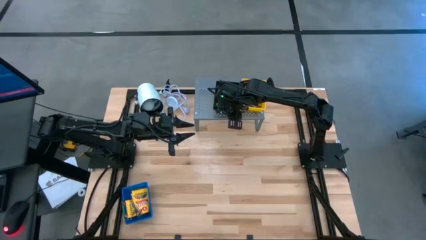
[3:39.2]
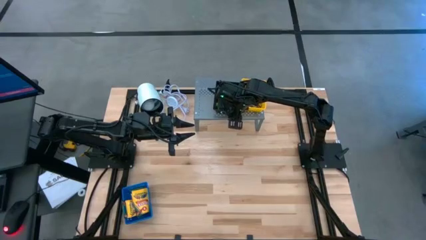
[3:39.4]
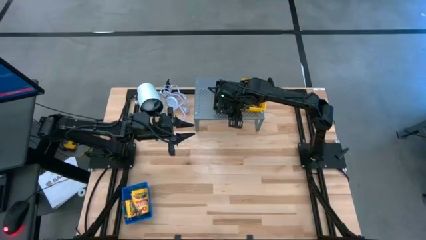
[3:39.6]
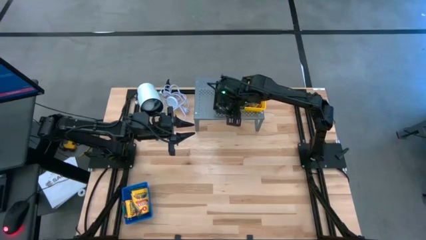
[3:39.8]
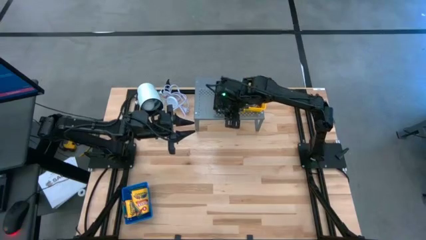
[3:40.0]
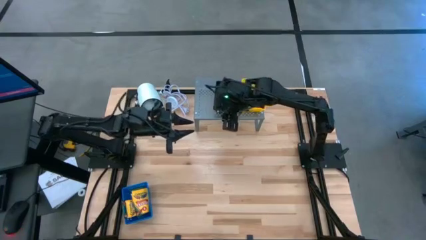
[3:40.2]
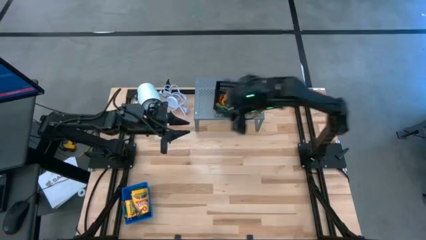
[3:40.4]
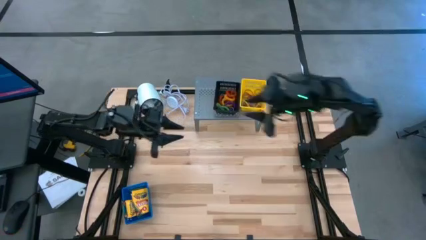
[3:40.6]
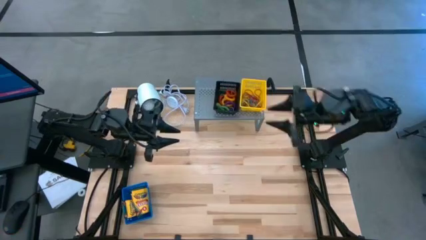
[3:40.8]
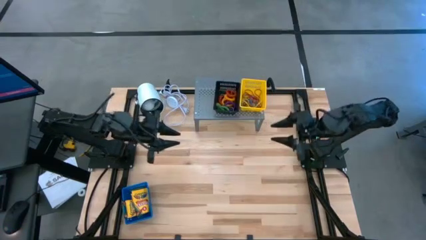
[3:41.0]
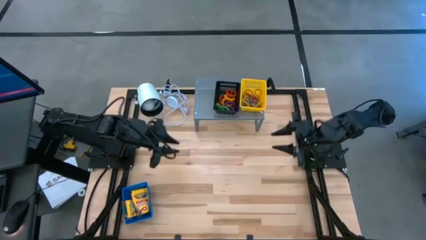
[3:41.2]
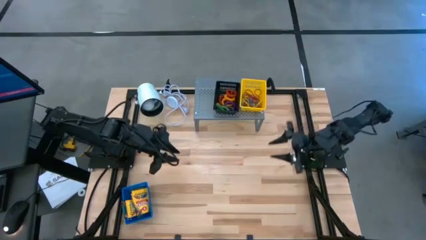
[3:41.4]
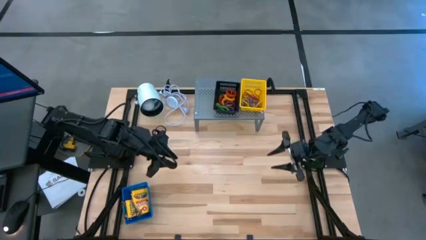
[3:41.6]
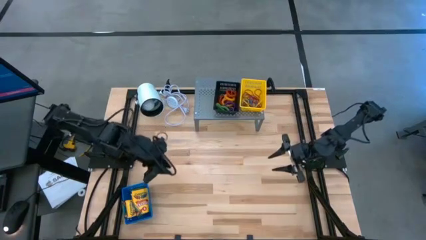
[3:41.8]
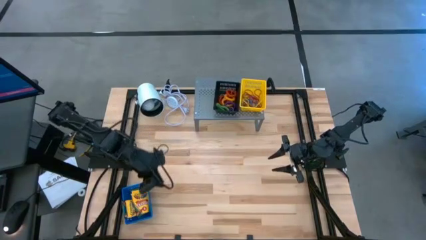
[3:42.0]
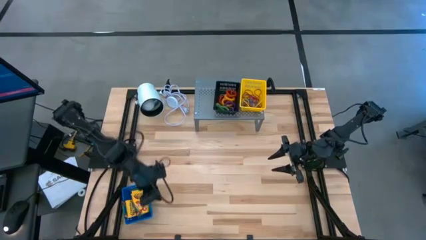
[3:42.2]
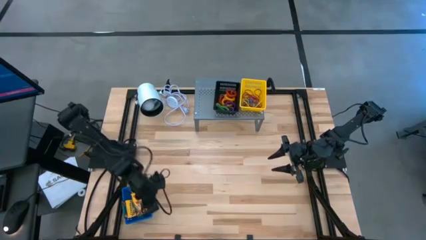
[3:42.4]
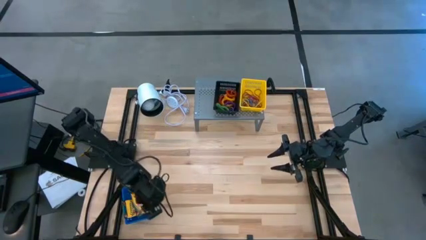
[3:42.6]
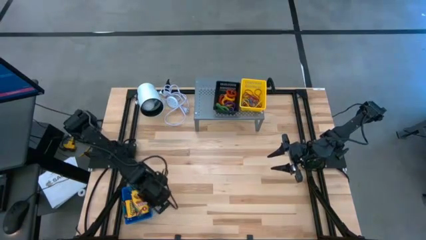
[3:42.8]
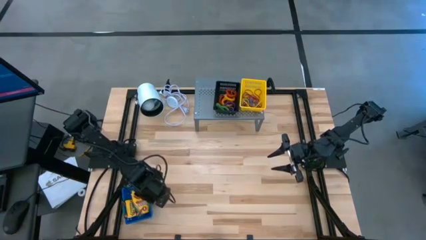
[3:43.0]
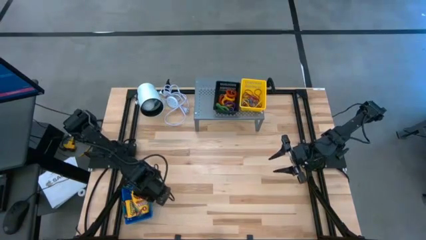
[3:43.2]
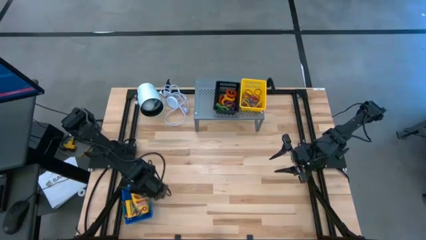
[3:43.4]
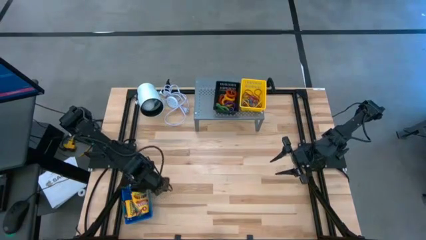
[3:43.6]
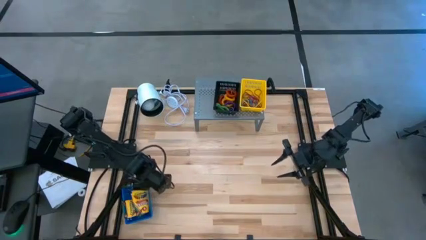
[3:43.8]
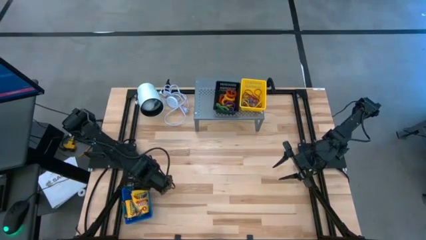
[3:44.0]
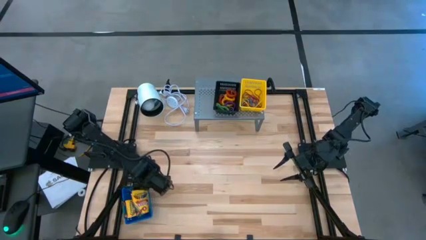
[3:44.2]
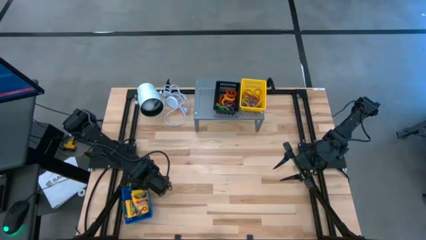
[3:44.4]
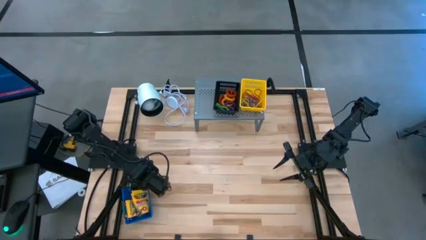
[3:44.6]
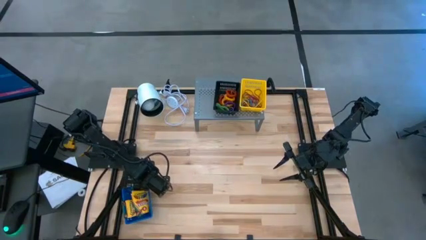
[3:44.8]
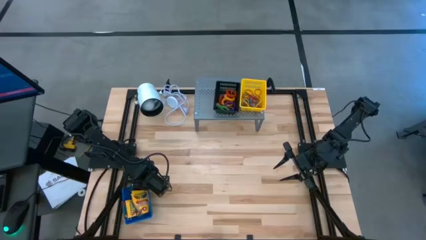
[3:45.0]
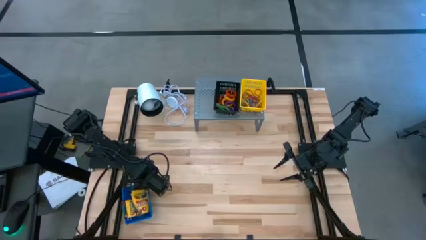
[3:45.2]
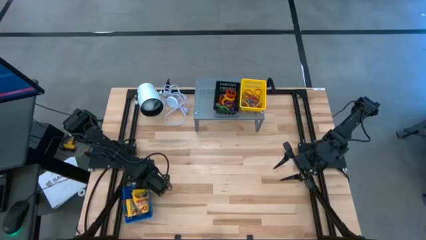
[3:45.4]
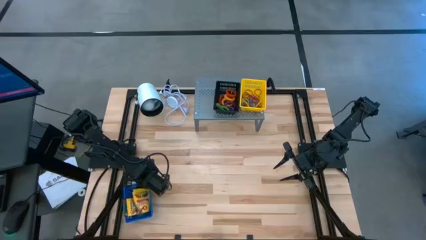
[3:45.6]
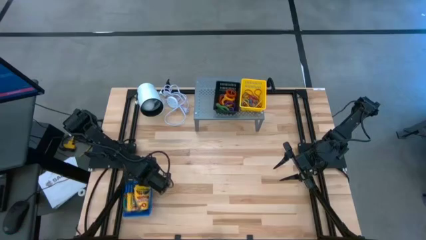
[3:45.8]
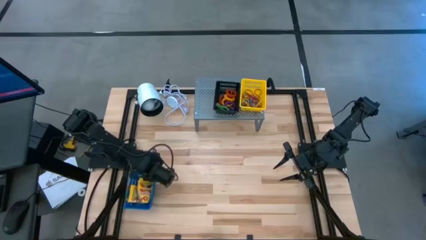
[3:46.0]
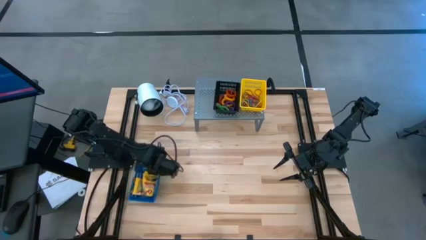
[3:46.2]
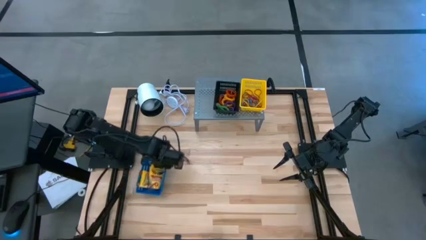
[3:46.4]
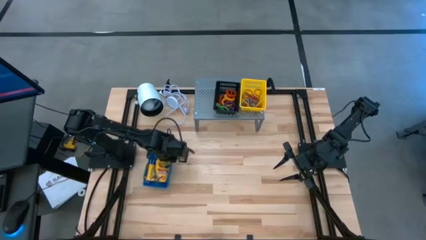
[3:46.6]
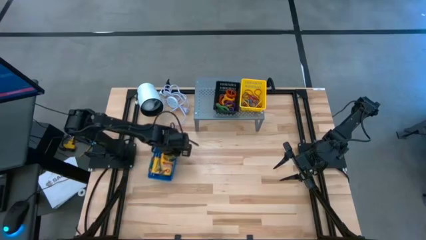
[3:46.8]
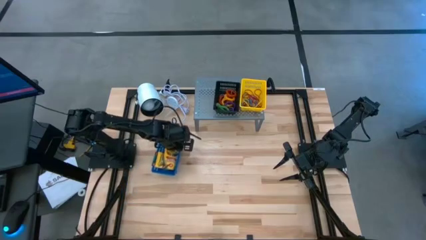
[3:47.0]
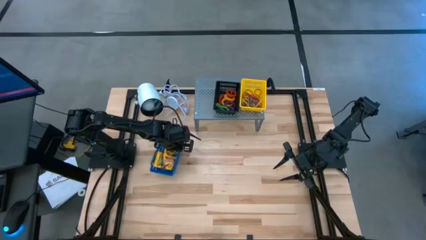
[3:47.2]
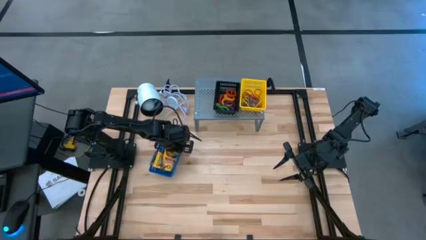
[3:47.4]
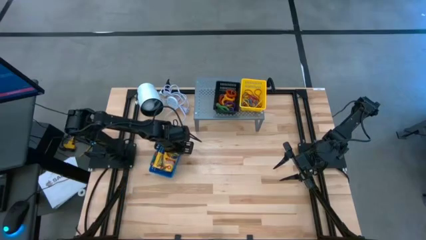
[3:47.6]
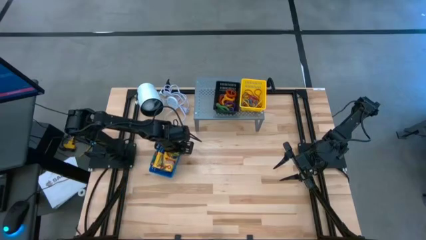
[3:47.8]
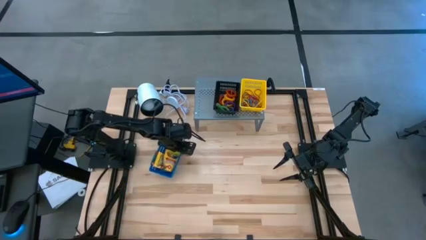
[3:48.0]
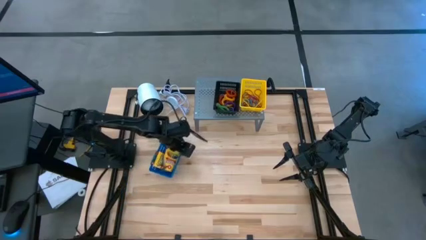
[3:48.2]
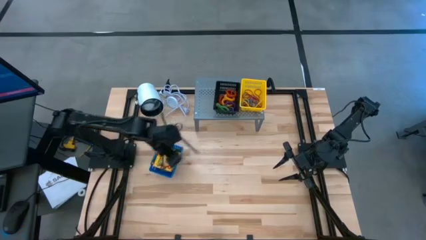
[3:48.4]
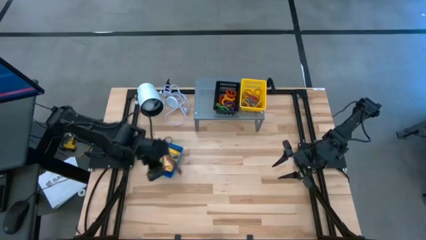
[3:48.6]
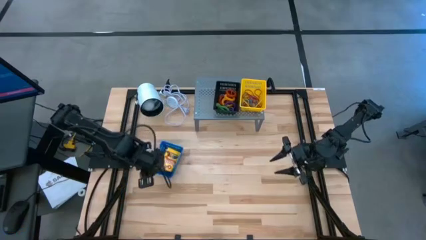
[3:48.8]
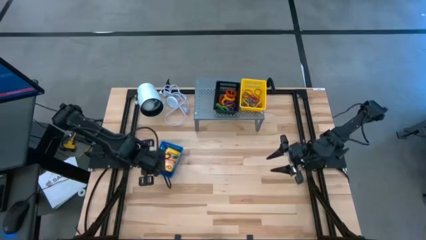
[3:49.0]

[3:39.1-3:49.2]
Task: Pick & Place Office Desk Supplies
Put the blue basket filled with crayon box on the shelf

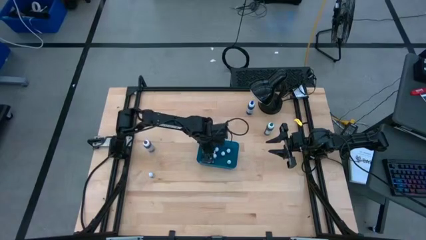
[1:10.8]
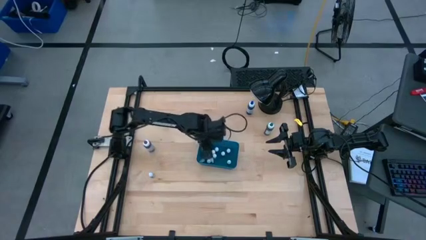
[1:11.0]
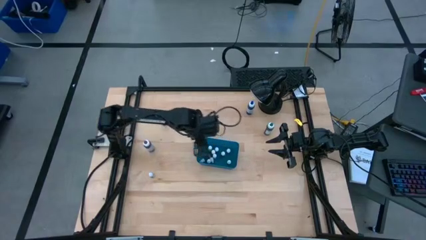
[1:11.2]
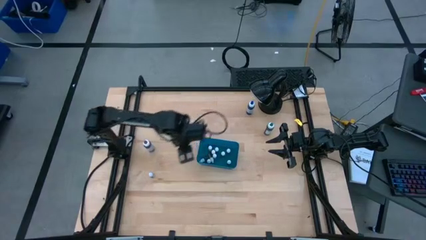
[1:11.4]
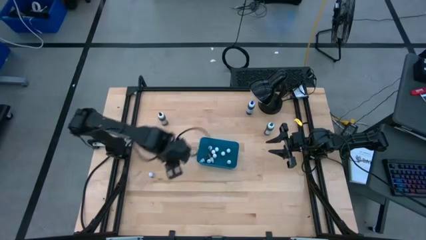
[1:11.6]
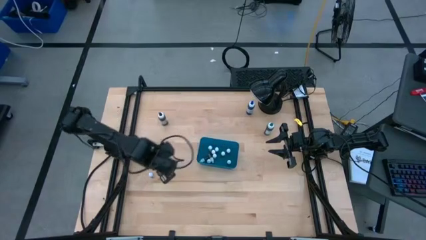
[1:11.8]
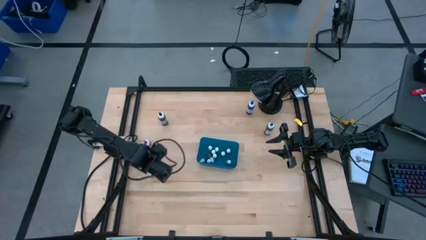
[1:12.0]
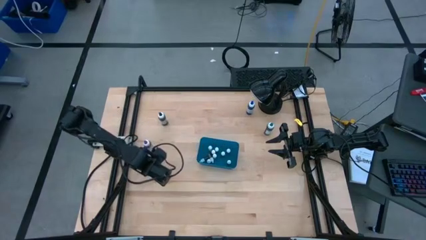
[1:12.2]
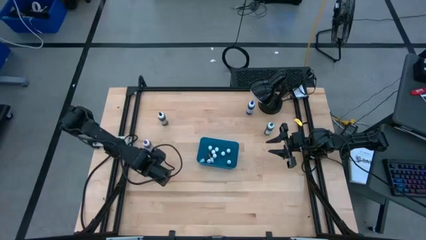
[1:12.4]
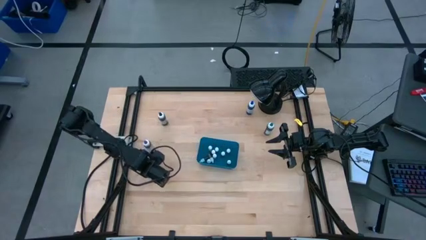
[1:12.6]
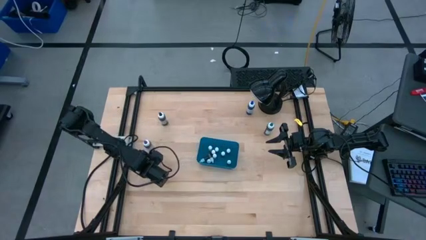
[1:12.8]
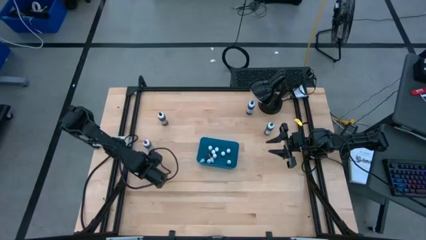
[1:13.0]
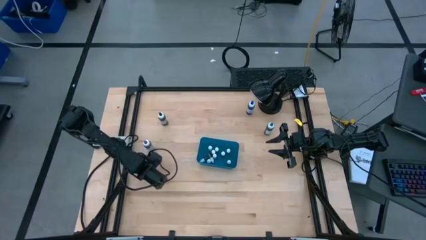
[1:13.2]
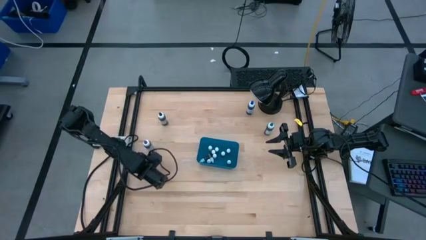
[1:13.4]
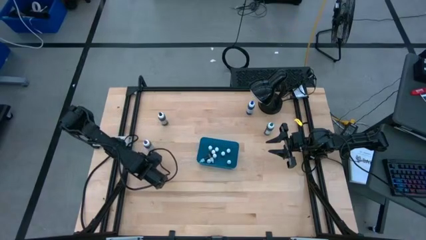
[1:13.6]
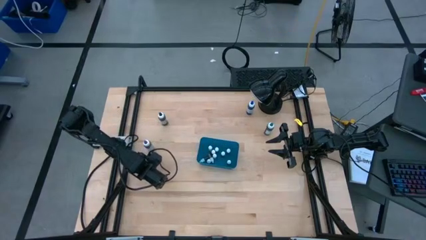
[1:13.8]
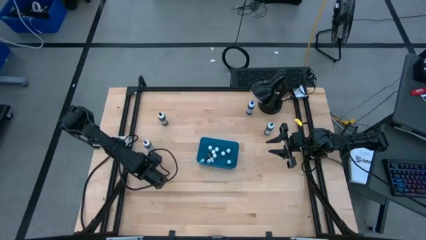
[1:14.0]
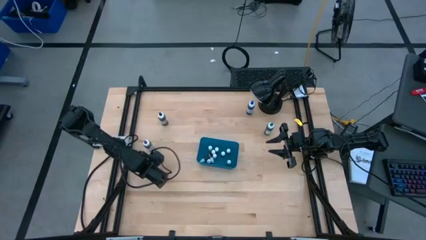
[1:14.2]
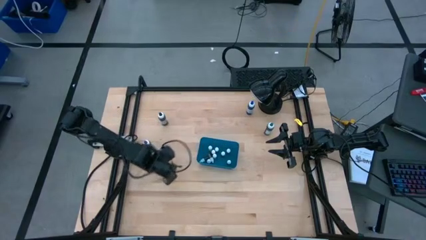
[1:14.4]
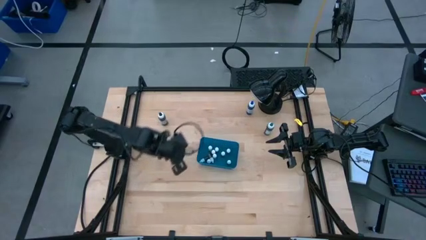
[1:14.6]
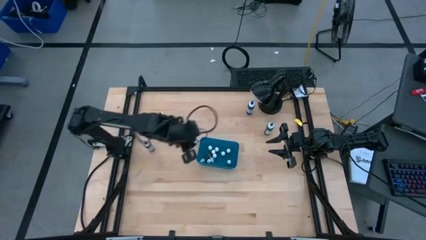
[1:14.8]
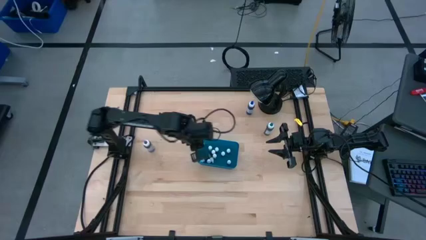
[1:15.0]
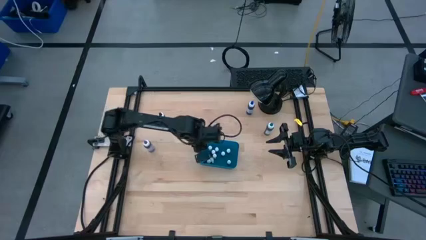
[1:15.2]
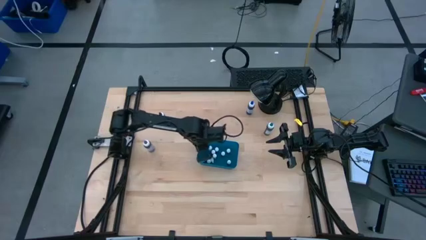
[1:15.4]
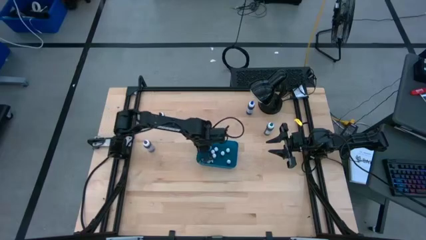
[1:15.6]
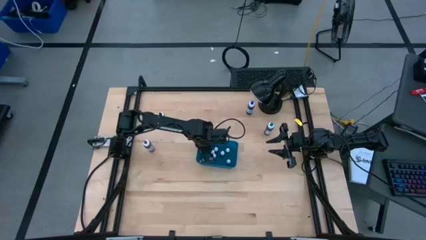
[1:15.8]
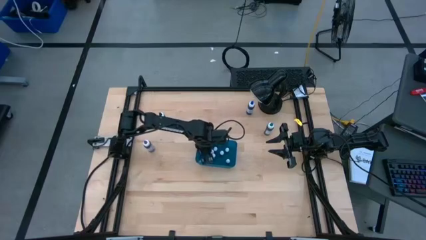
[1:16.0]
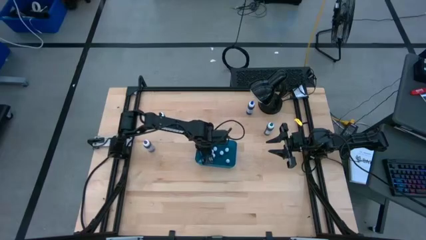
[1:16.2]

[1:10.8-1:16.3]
Task: Pick & Place food coloring
Put the small black food coloring bottle into the blue bin
